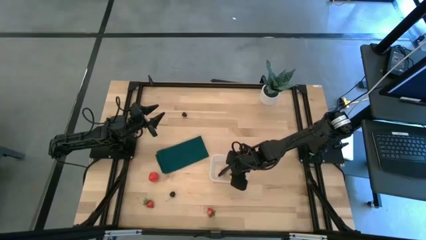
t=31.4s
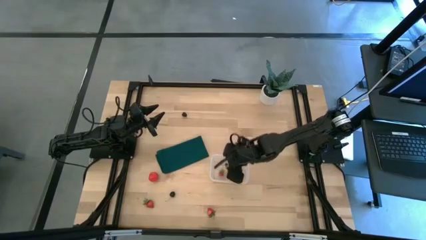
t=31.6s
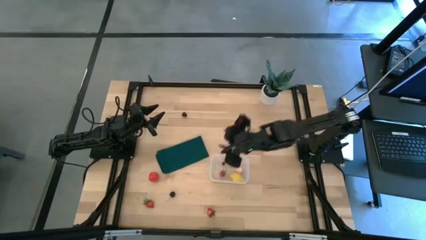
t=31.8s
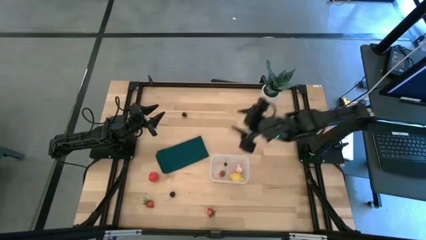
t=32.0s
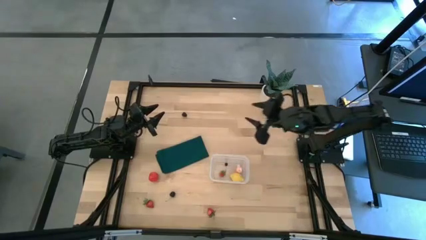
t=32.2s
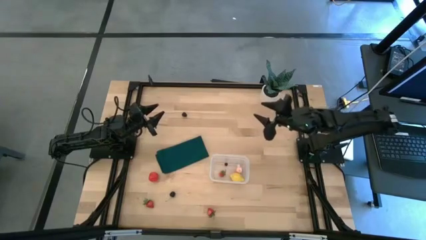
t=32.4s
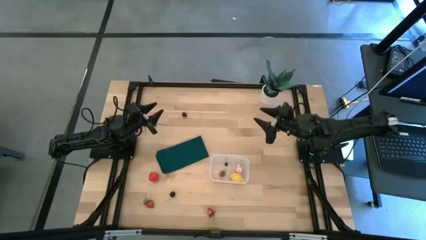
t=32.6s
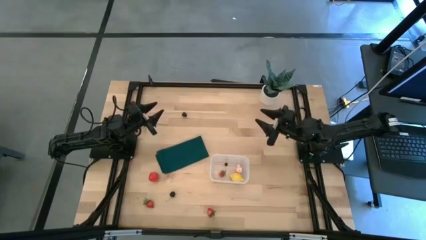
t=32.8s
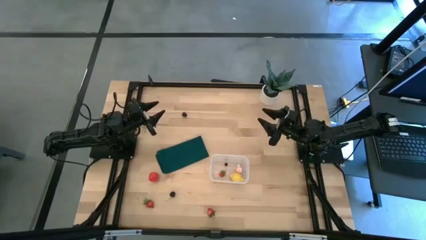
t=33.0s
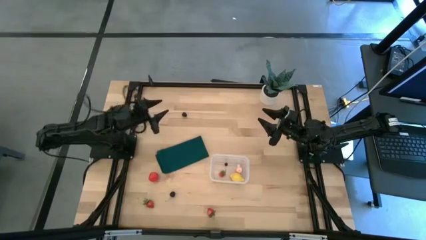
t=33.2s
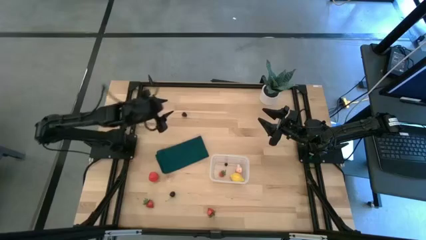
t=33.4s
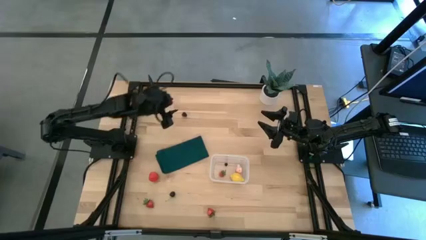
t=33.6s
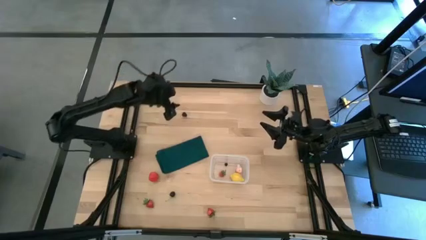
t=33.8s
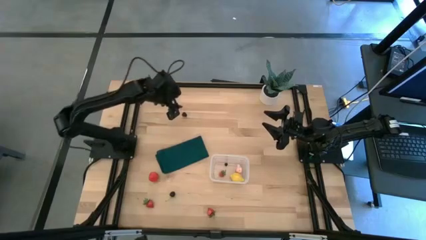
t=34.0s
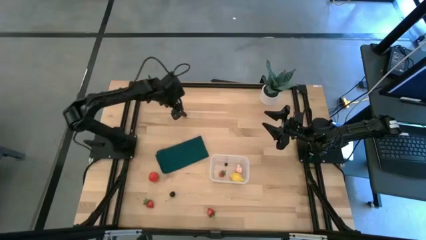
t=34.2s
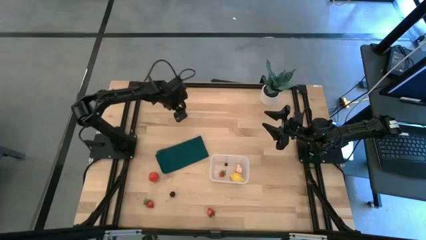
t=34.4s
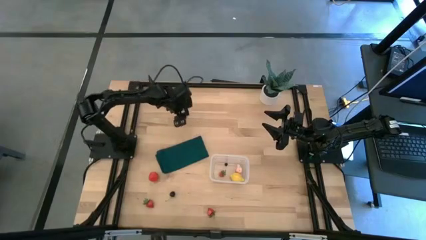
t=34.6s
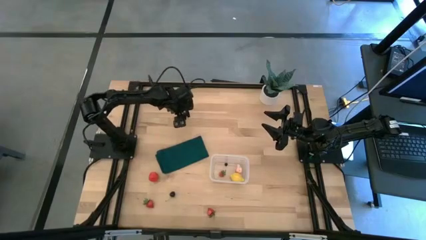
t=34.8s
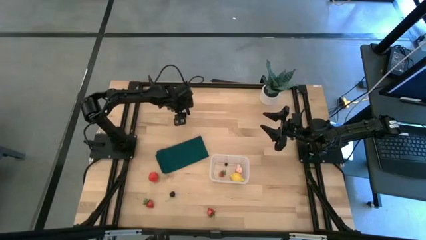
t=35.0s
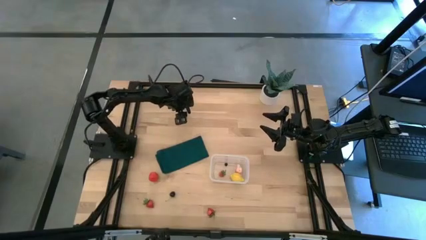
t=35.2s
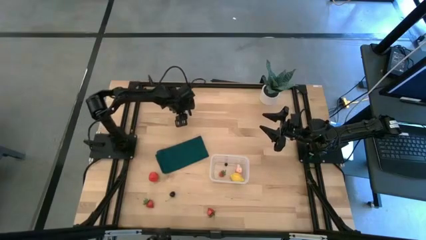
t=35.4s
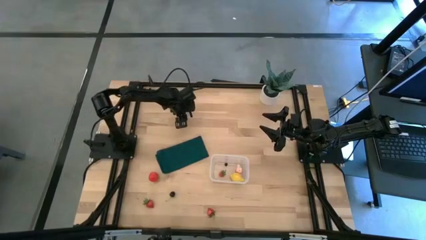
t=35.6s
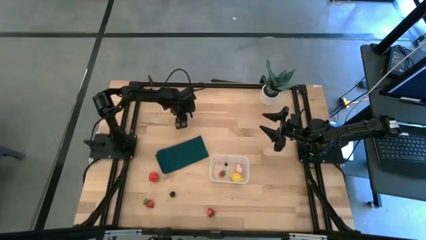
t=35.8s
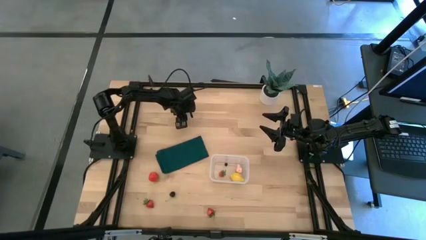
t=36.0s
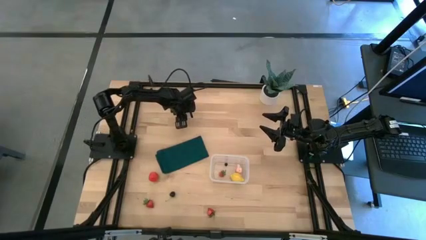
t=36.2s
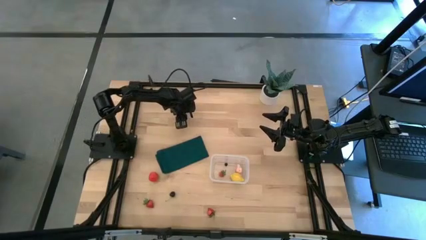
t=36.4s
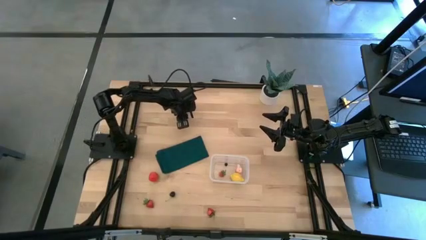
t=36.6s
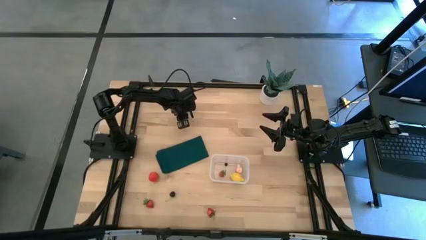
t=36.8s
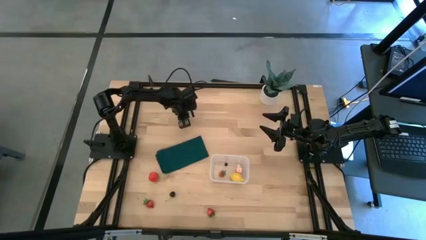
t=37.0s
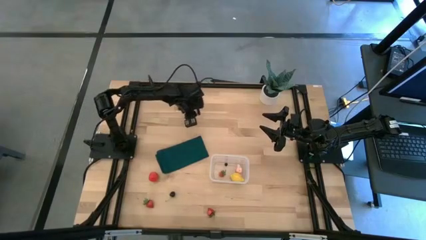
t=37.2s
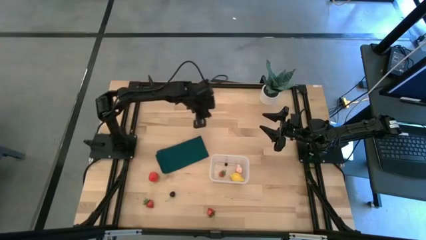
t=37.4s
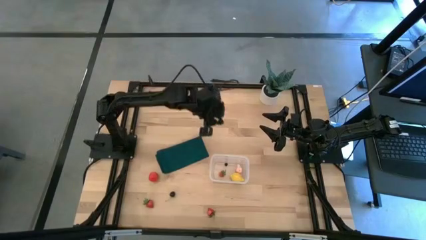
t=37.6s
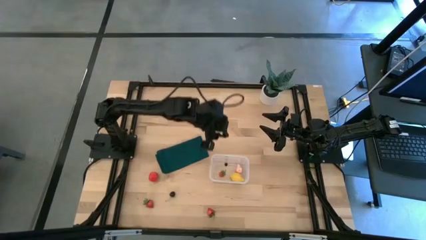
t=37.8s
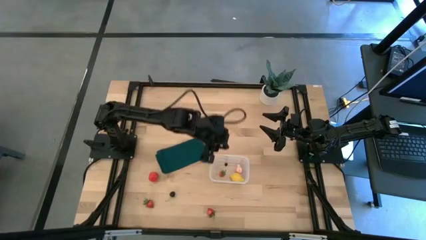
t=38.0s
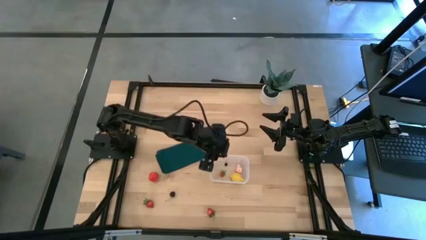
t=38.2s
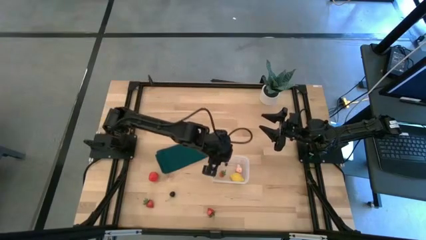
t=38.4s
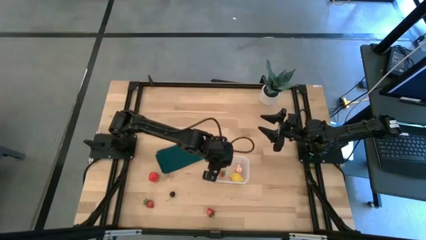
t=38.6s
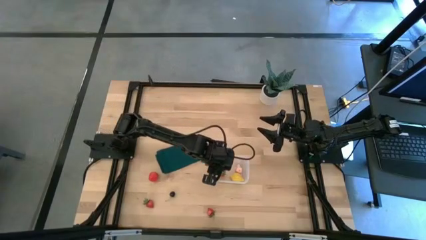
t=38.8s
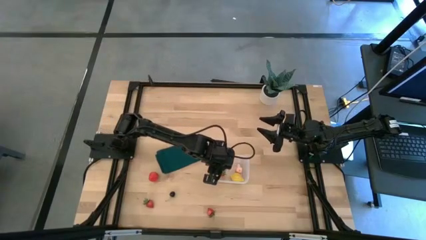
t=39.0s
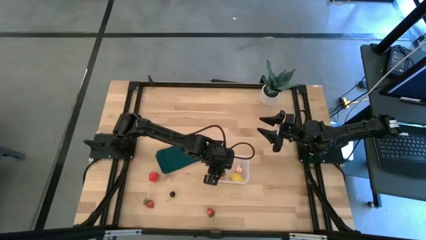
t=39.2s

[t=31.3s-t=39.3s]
Task: Pick and placing Produce into tupperware
Put the blackberry into the transparent bin

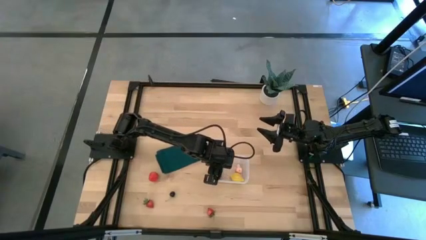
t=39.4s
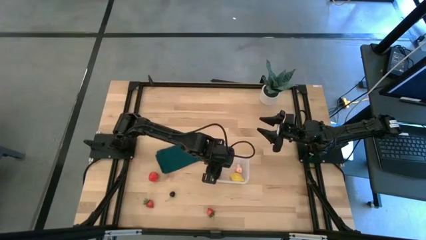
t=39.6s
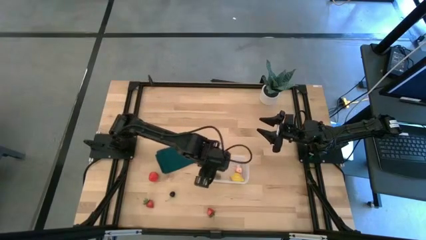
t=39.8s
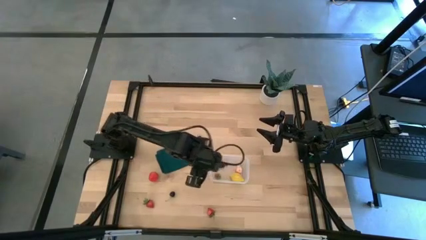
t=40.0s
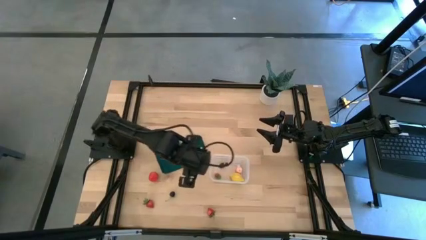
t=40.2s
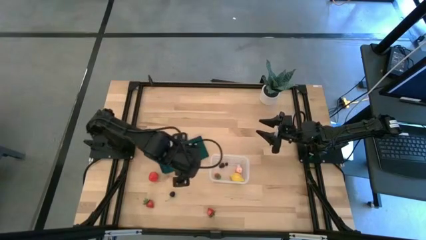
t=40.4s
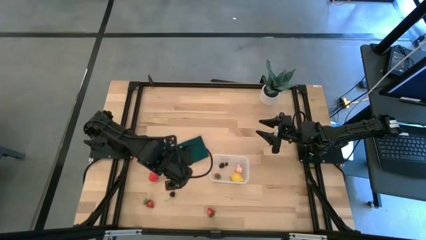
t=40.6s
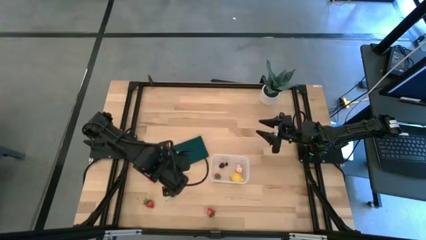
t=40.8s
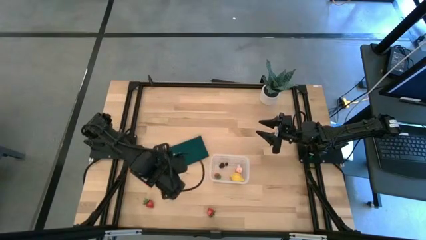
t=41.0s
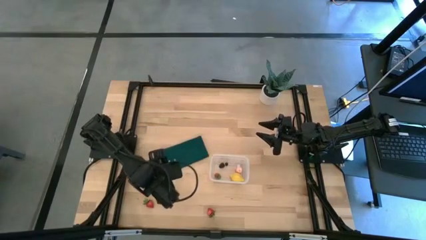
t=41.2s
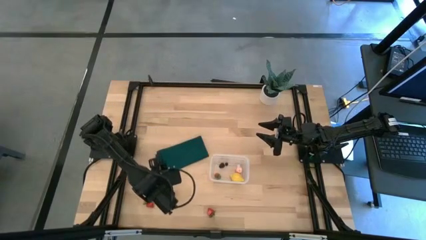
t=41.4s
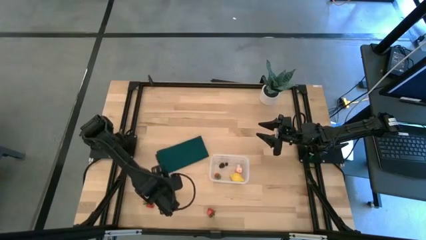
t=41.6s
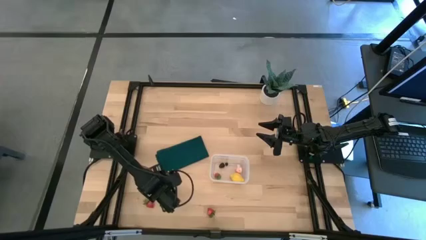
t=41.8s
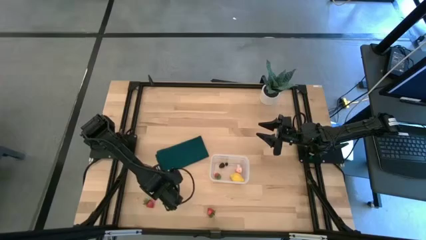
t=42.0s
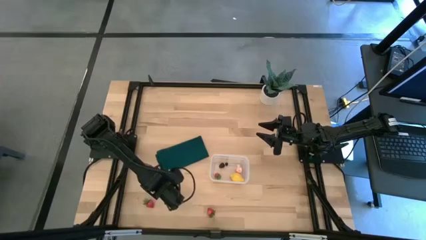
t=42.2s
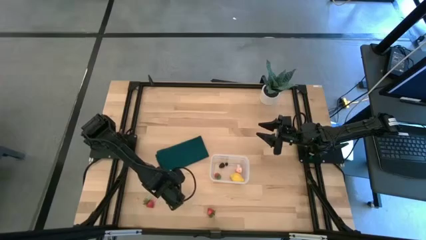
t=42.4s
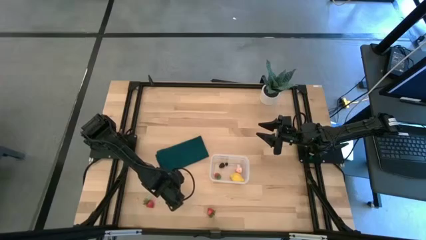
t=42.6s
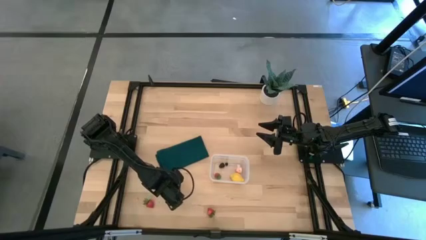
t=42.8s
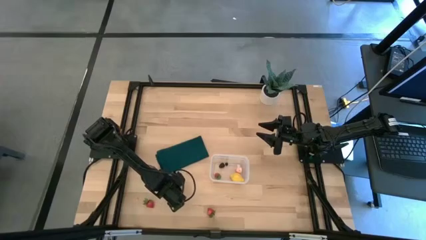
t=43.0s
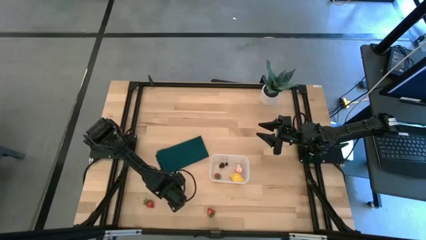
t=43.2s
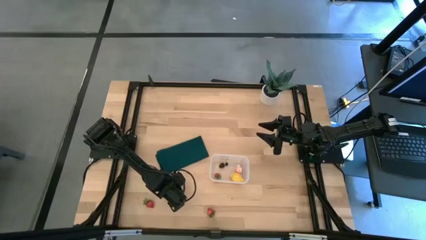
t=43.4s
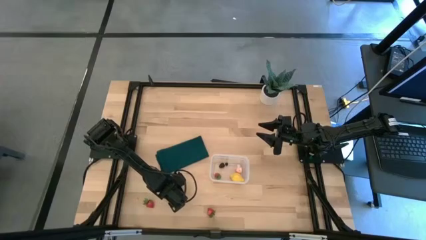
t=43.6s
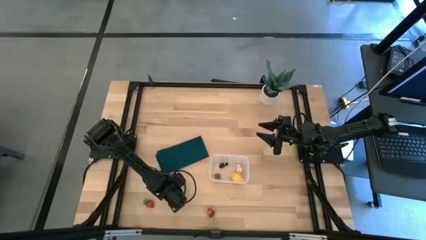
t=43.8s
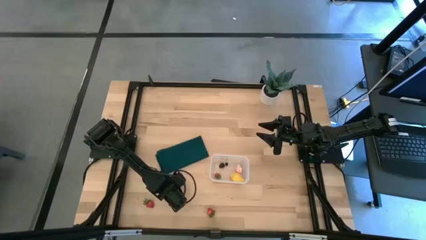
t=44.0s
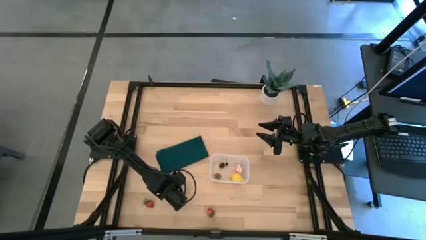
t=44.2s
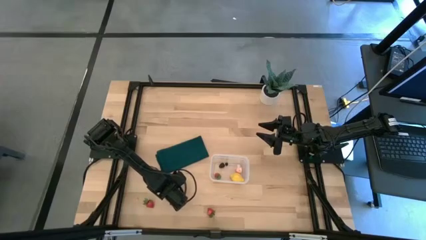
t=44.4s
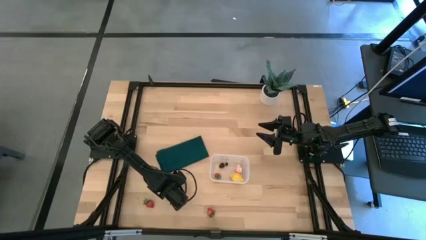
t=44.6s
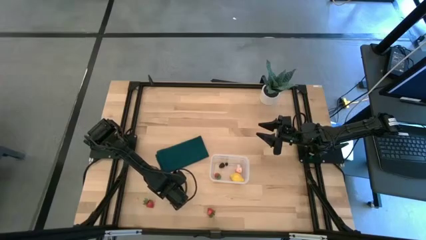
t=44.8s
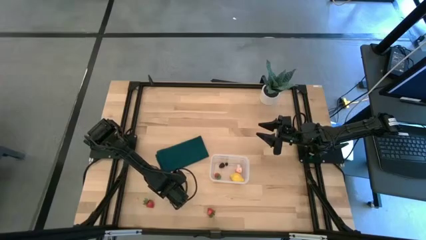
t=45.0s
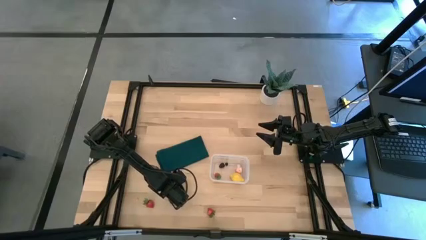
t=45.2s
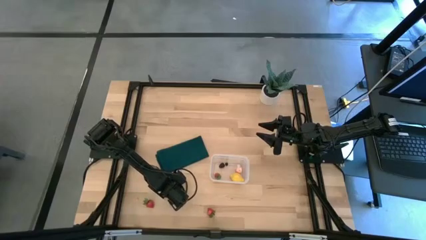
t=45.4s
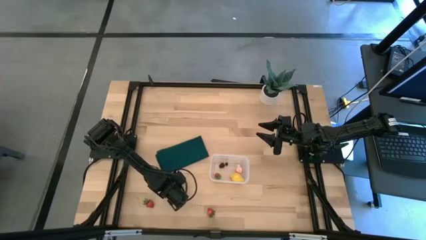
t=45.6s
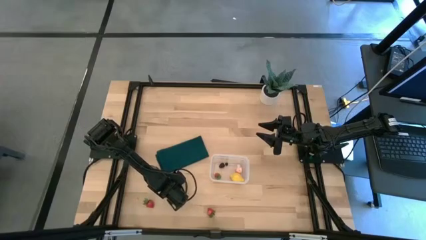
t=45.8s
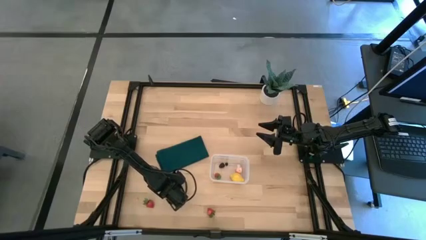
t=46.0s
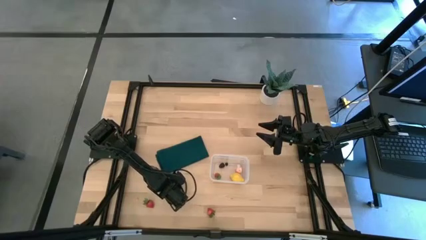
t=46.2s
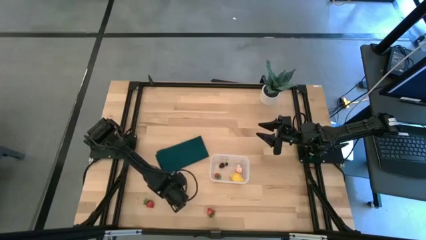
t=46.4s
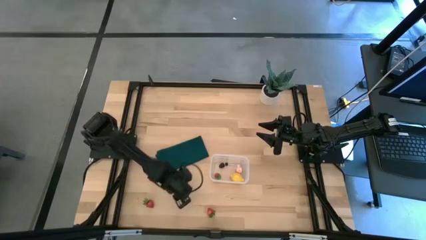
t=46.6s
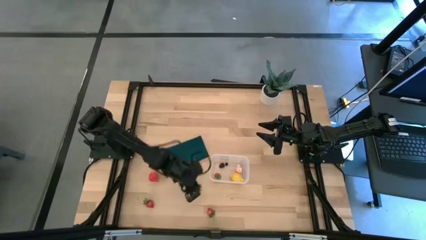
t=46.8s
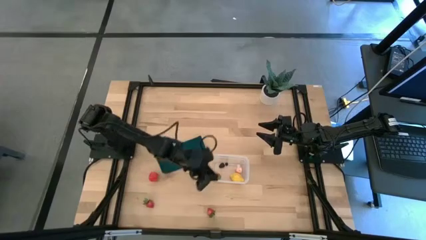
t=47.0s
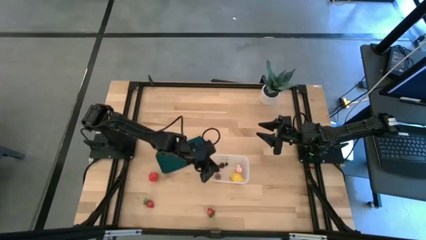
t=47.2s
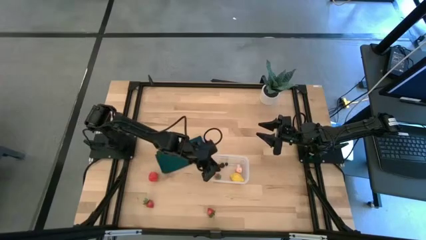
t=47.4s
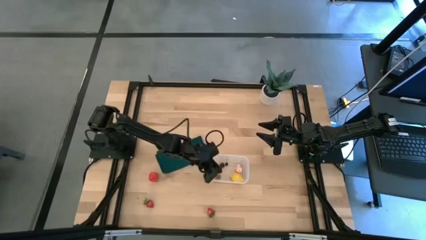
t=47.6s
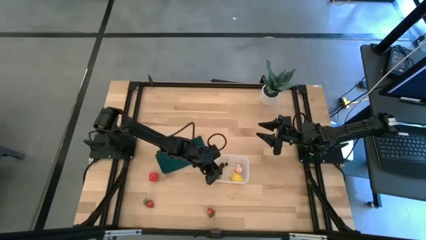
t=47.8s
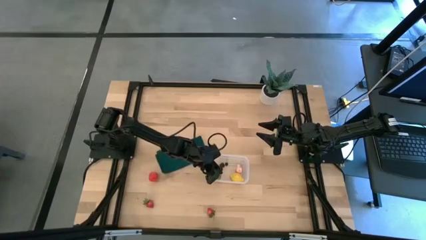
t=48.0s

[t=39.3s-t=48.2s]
Put the cherry into the transparent bin
